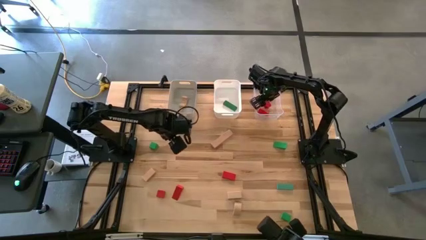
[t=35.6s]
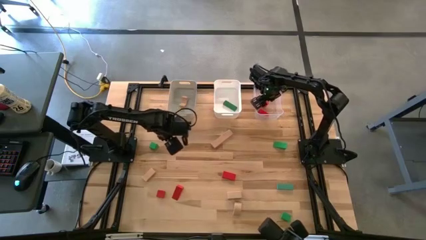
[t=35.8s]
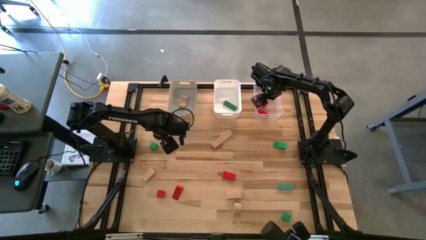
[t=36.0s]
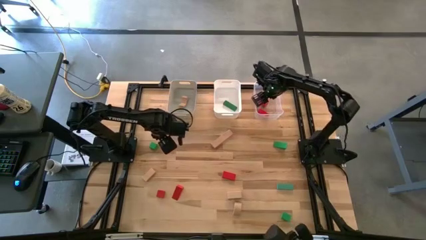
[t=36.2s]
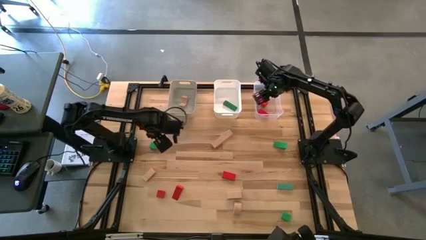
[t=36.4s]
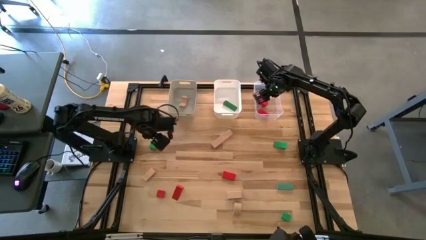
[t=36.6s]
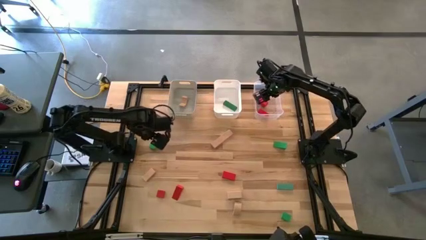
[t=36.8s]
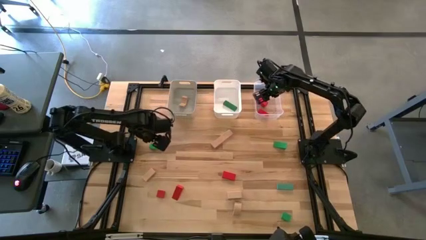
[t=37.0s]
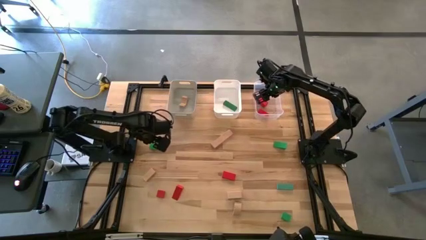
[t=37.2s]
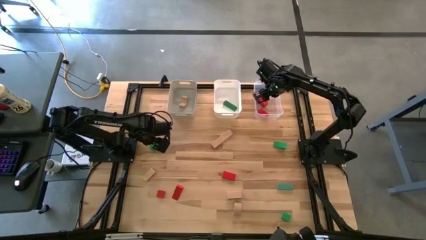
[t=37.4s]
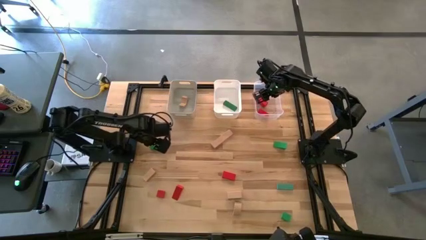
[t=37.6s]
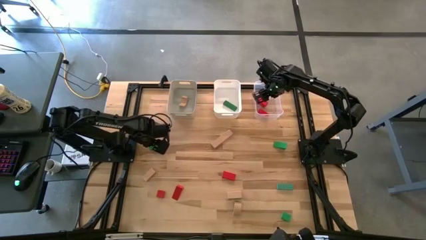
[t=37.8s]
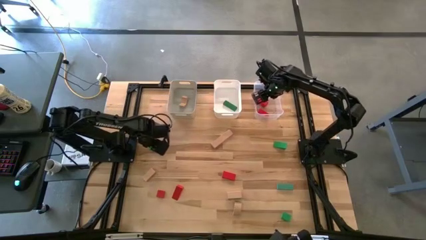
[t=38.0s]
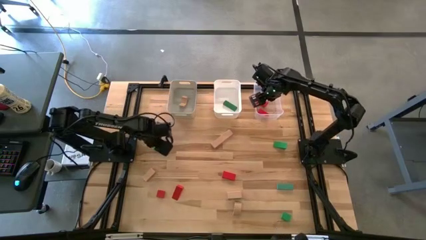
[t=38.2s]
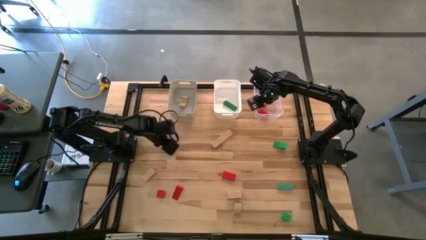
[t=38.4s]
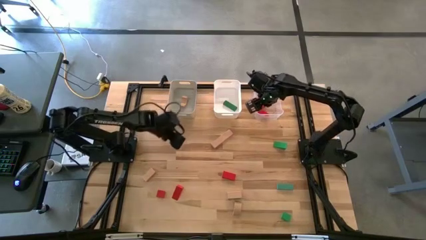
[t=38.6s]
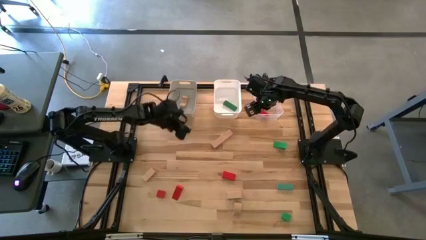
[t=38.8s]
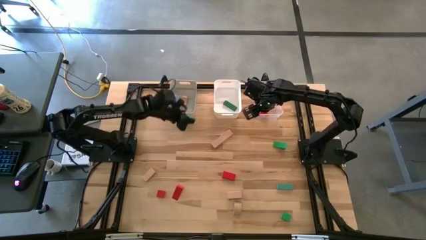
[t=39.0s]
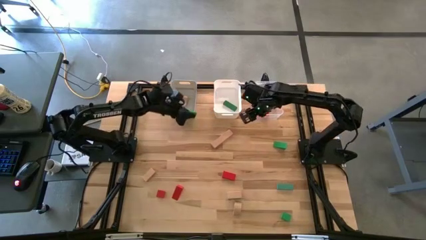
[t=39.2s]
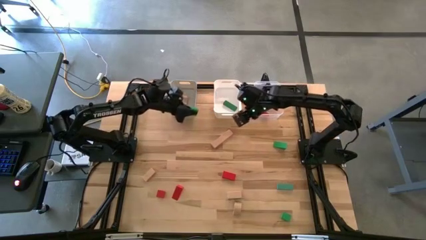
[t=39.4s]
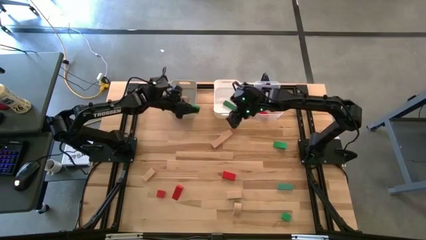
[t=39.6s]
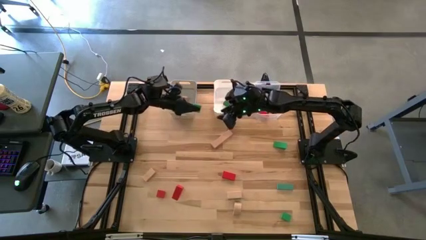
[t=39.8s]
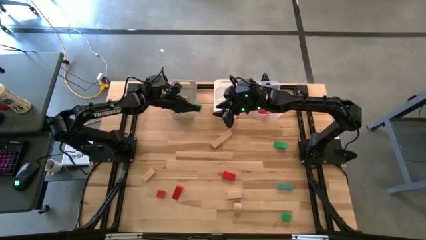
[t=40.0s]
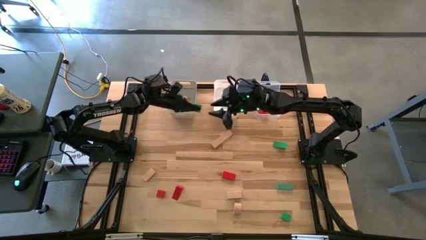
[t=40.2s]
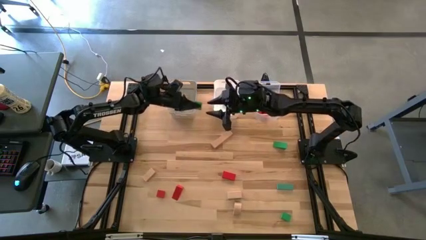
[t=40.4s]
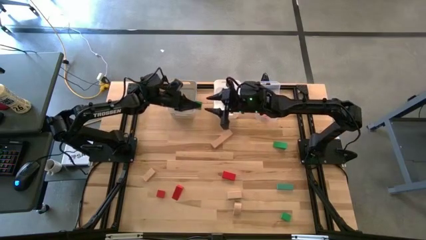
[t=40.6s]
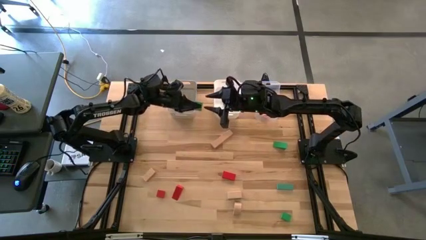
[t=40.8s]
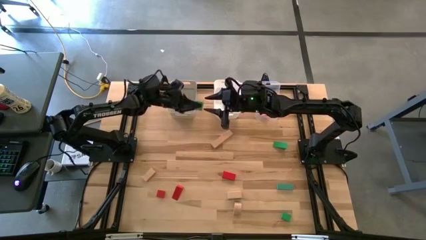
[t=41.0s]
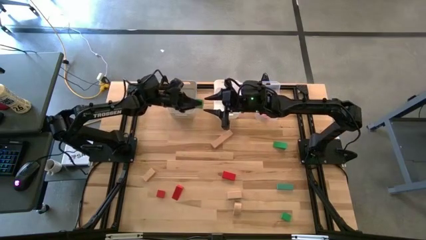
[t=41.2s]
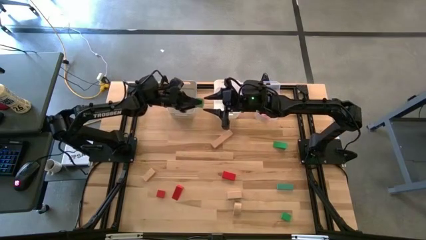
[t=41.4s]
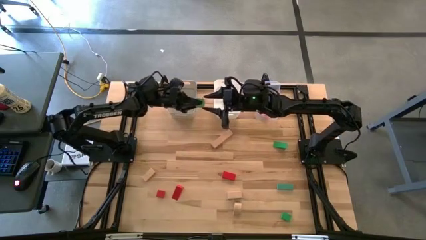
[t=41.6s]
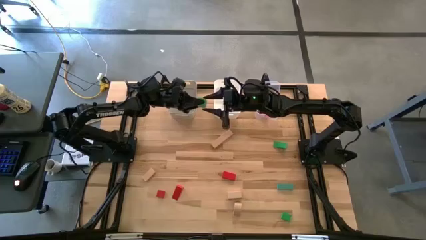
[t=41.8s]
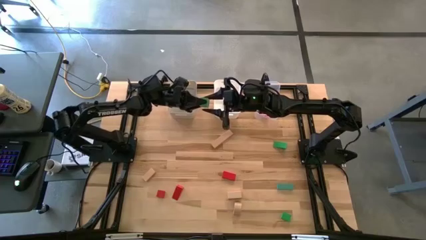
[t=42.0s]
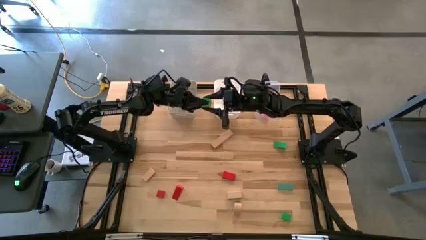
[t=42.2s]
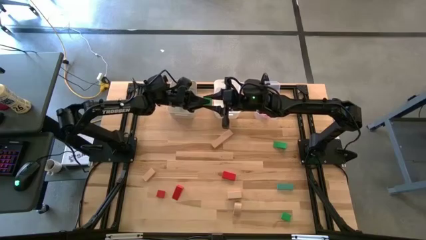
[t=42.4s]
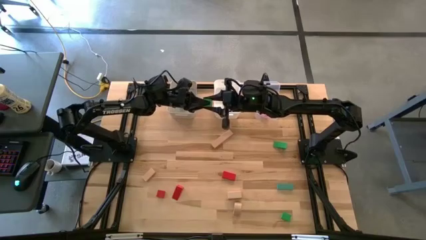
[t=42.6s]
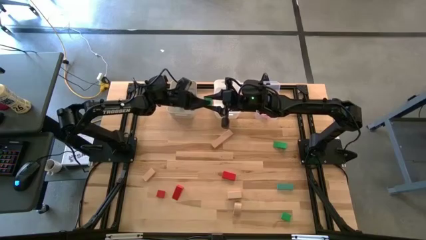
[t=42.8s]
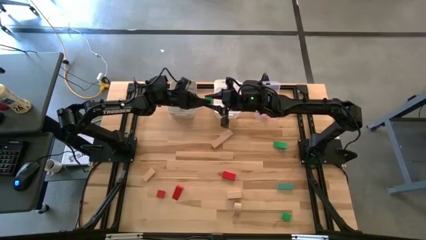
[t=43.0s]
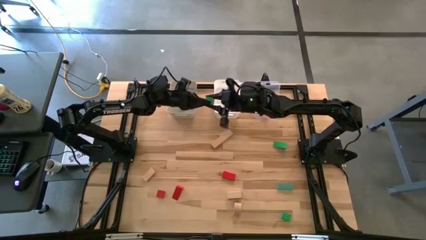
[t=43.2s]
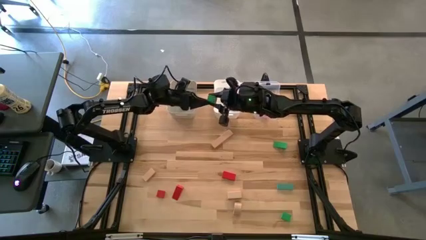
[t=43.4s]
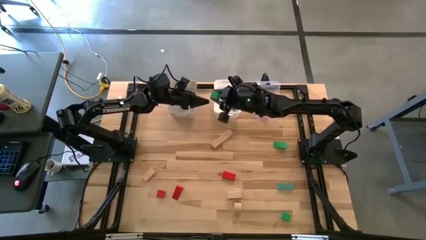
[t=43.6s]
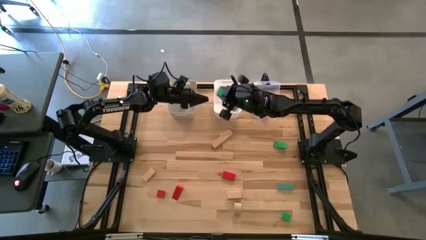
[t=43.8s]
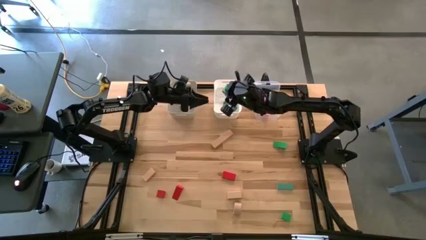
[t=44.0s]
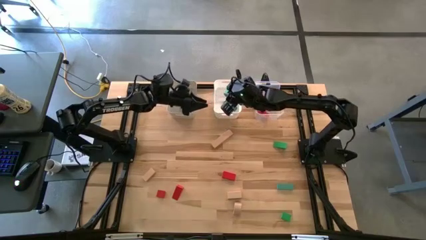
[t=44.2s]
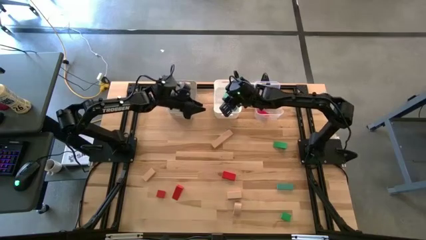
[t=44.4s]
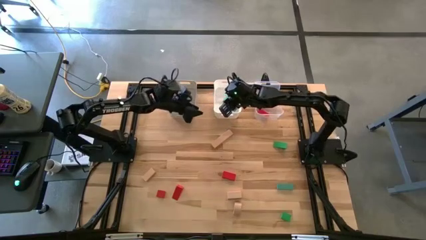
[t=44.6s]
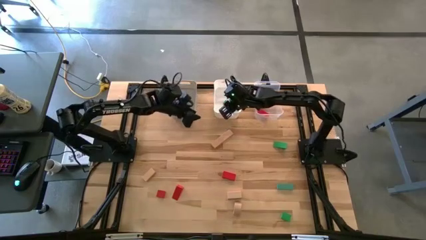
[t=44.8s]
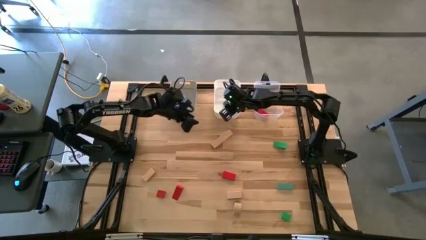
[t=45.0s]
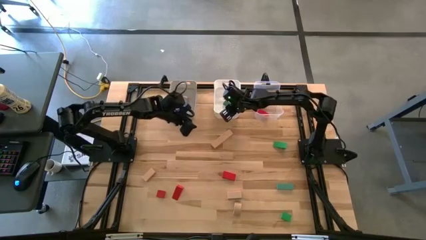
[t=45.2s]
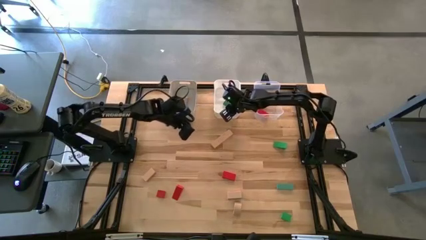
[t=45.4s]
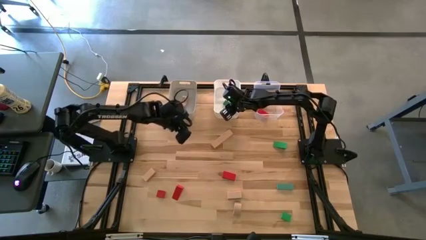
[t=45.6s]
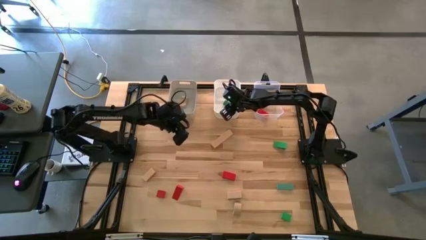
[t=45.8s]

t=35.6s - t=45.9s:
Task: Sort & place blocks by color
Put the green block into the white bin

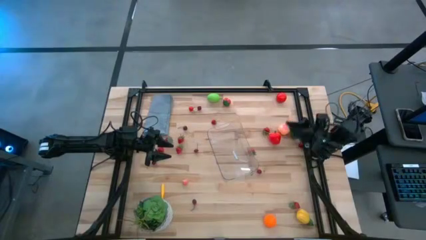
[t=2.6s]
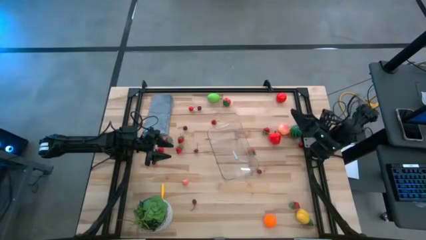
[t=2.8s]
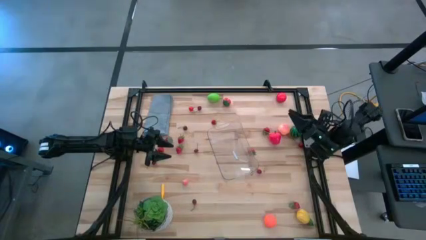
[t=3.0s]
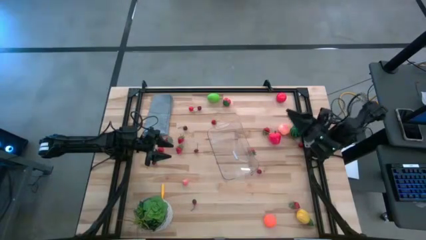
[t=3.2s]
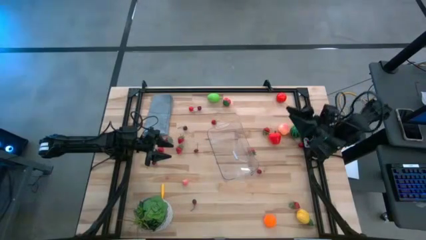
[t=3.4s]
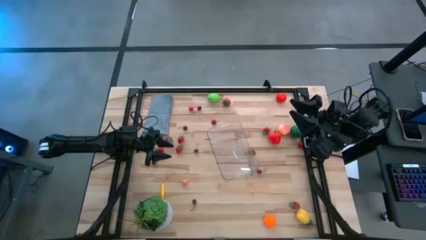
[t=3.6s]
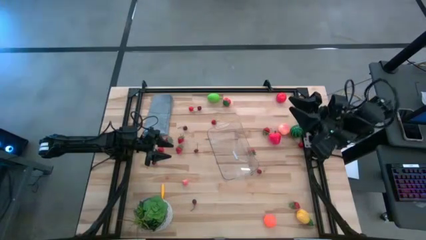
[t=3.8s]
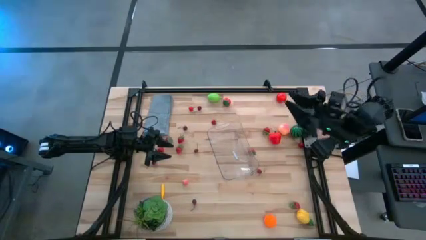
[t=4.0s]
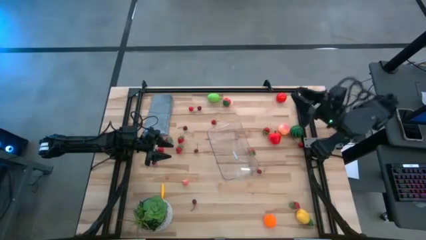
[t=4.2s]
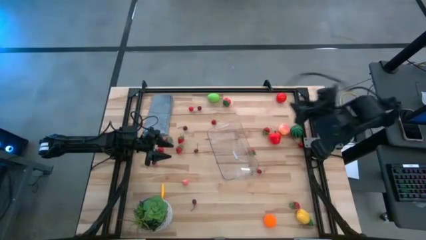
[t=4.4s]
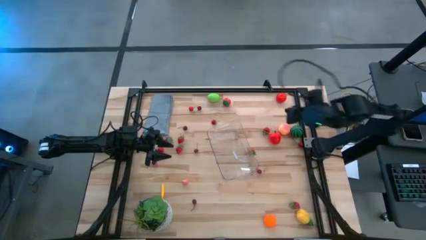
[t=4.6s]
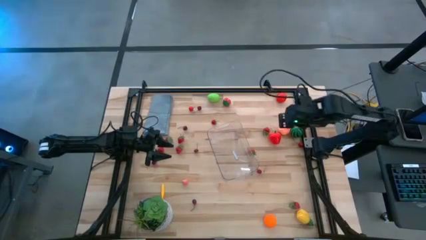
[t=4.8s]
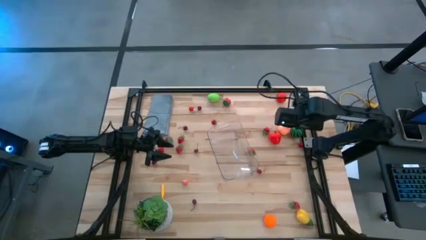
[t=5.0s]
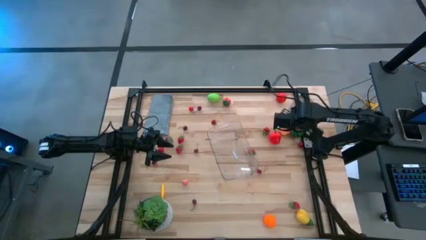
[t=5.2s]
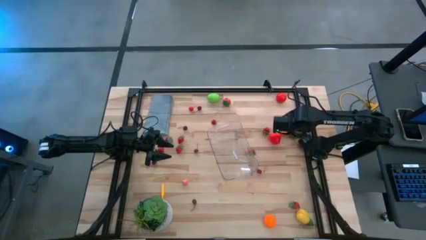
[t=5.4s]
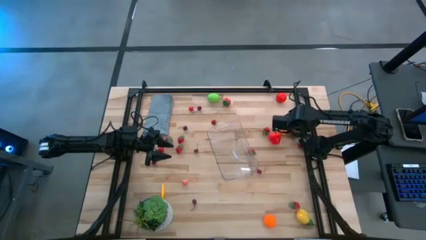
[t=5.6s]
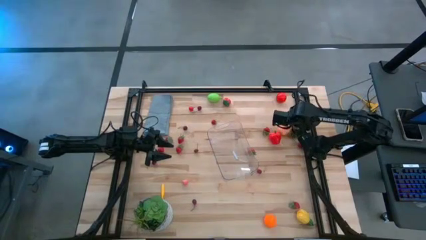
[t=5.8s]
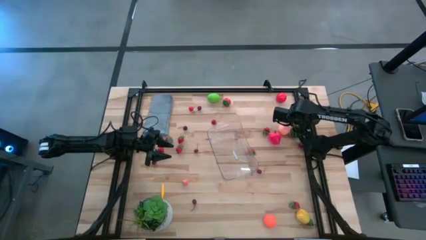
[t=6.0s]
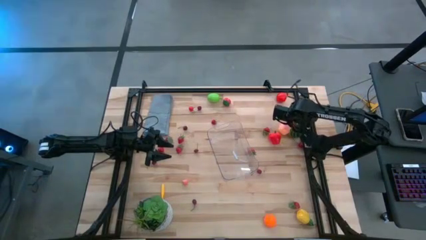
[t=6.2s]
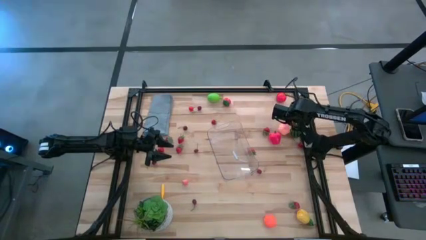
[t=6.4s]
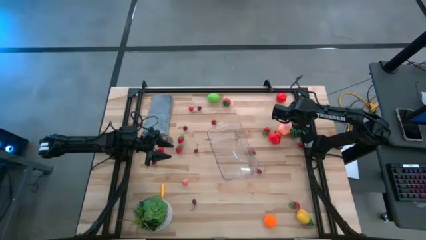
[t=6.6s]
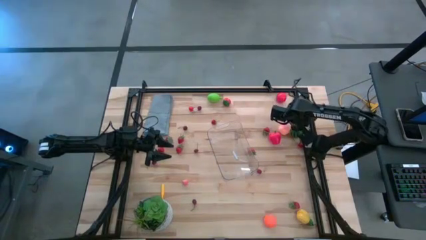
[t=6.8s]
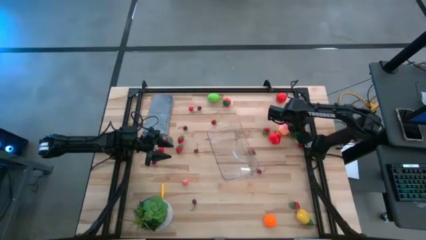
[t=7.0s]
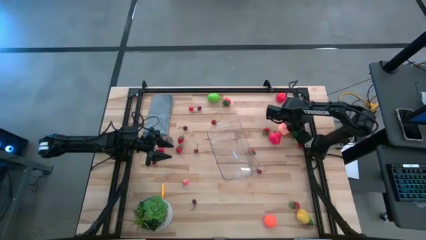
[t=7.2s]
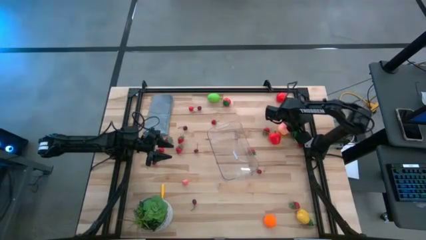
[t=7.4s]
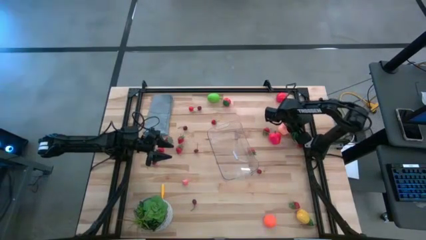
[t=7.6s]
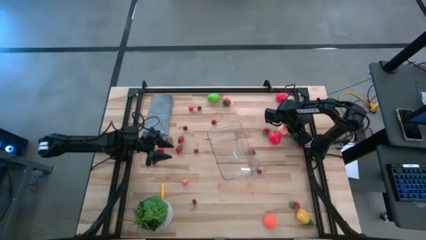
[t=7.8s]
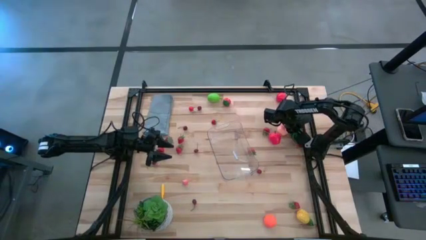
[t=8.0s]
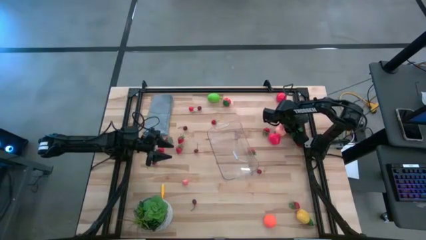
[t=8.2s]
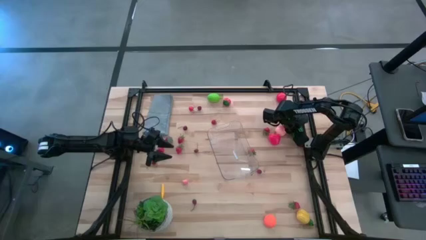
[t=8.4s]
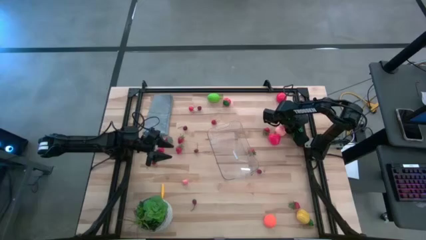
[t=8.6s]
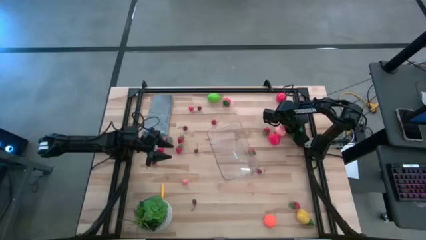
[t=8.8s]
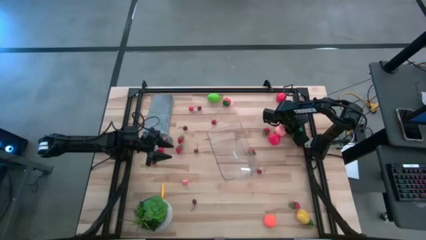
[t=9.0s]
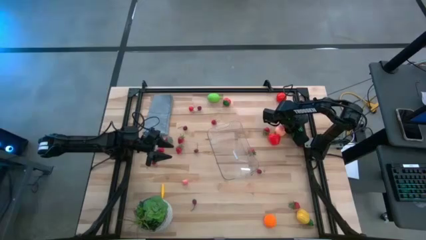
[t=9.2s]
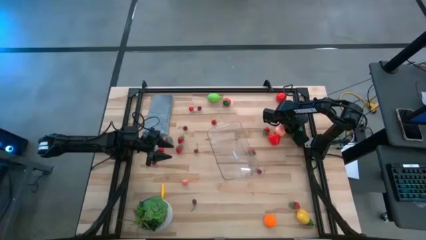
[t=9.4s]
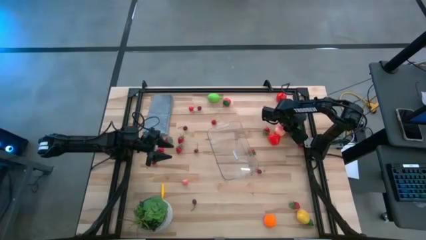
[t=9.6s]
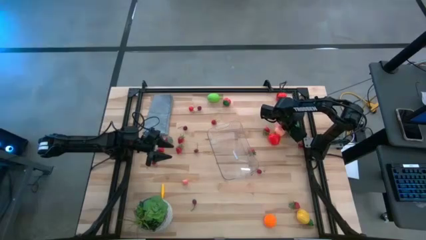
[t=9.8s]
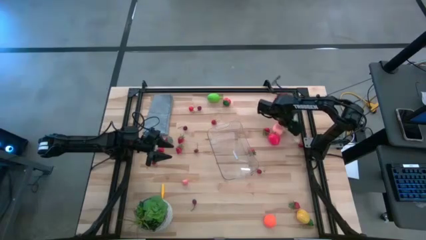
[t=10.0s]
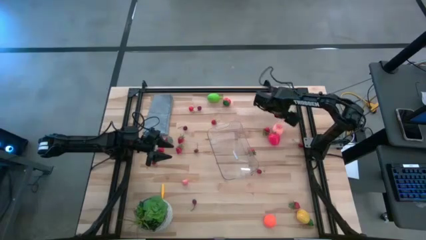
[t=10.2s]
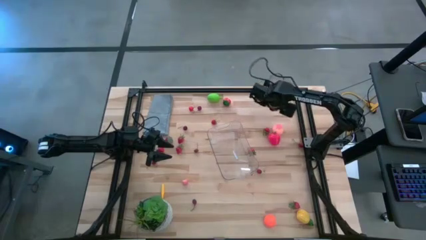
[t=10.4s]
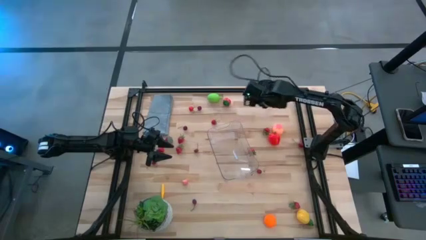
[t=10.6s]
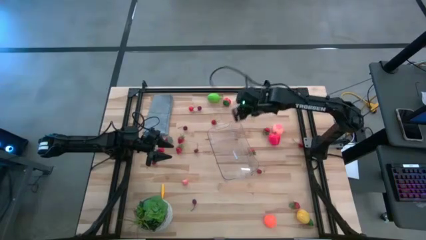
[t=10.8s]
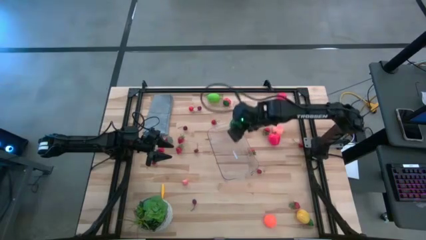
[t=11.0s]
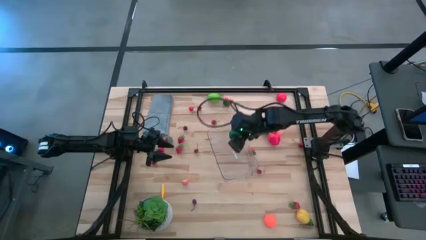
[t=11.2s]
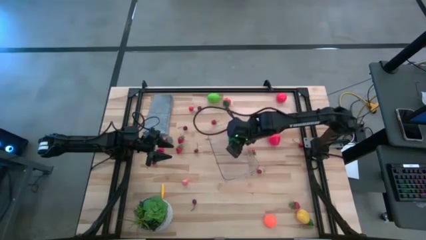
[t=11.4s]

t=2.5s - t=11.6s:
Task: Pick and placing Produce into tupperware
Put the green watermelon into the transparent bin
